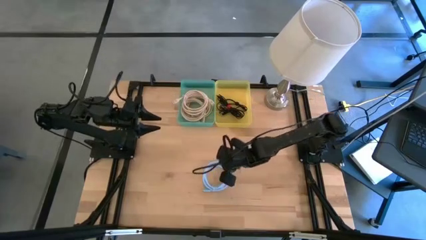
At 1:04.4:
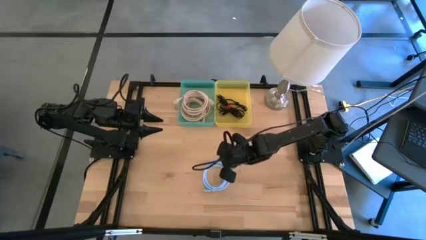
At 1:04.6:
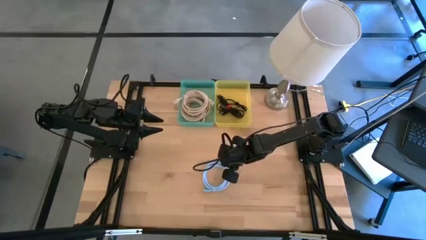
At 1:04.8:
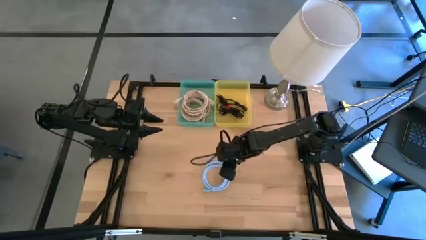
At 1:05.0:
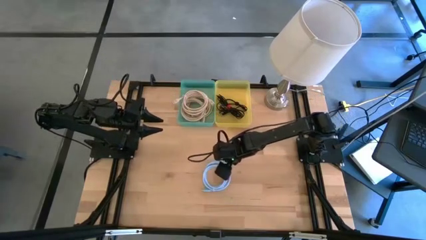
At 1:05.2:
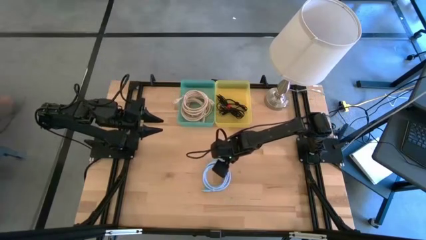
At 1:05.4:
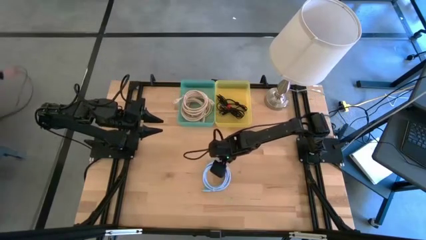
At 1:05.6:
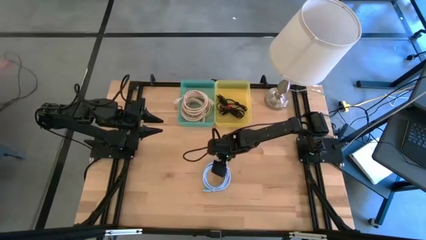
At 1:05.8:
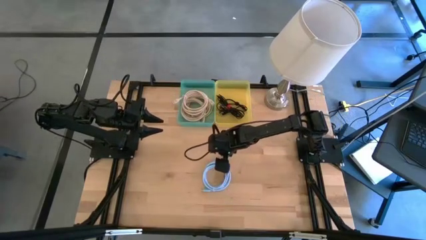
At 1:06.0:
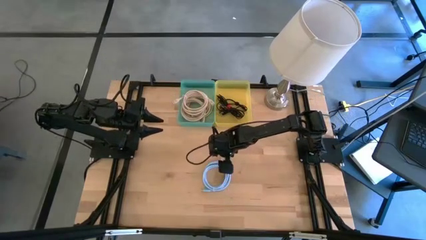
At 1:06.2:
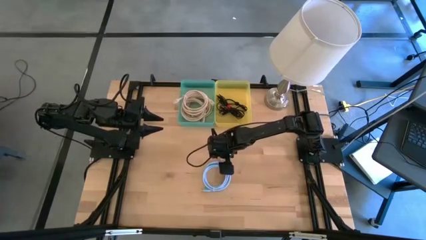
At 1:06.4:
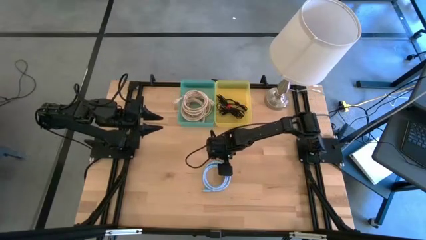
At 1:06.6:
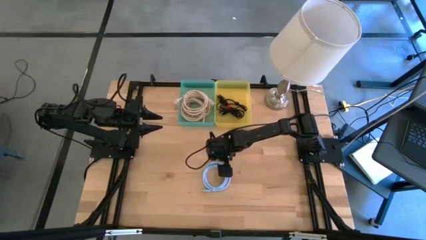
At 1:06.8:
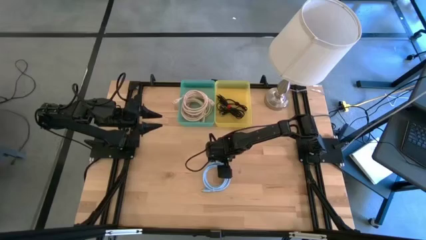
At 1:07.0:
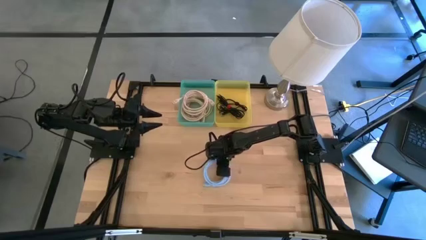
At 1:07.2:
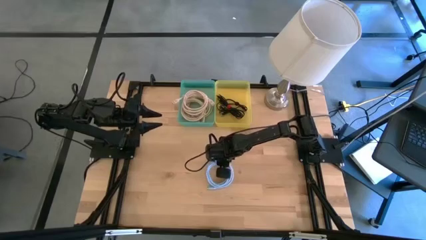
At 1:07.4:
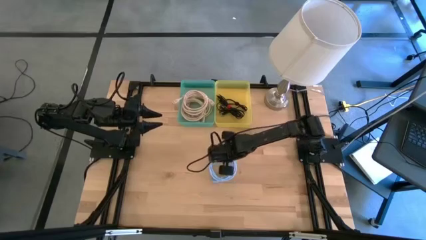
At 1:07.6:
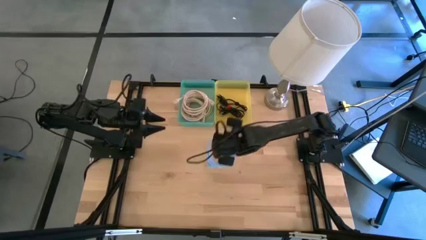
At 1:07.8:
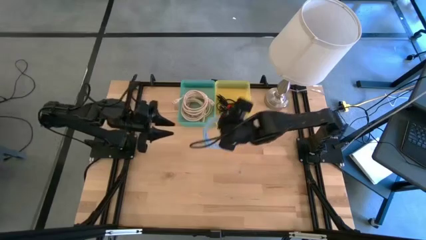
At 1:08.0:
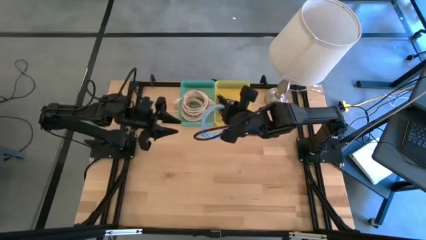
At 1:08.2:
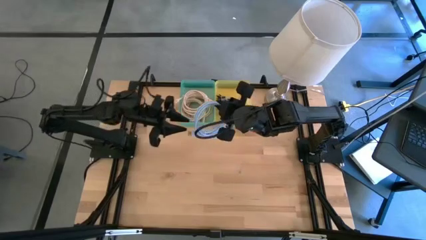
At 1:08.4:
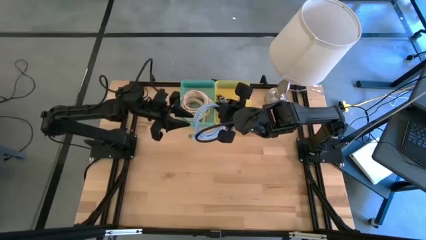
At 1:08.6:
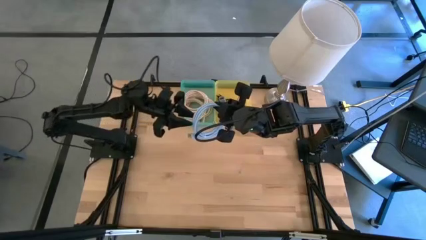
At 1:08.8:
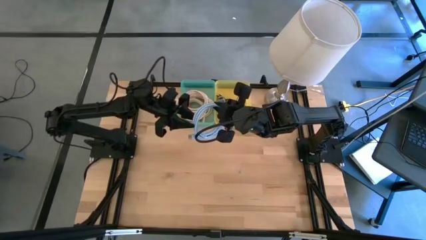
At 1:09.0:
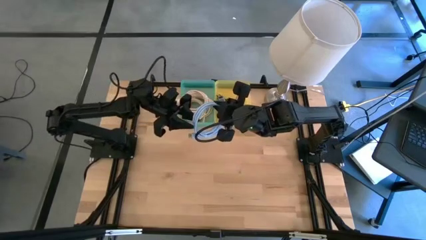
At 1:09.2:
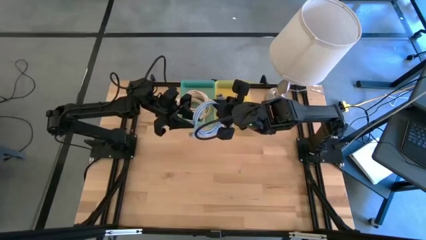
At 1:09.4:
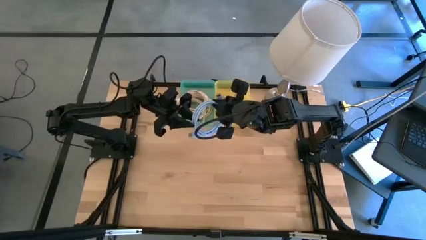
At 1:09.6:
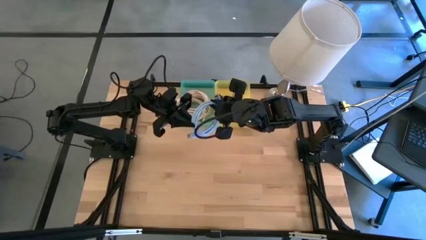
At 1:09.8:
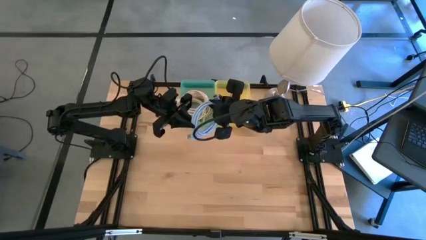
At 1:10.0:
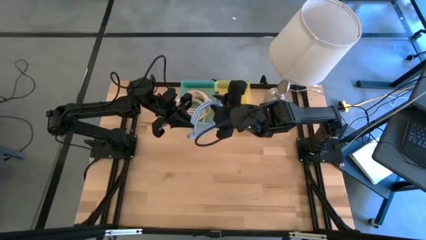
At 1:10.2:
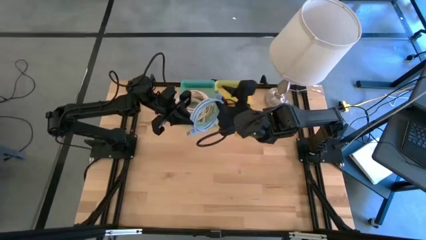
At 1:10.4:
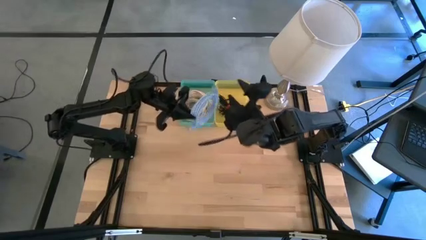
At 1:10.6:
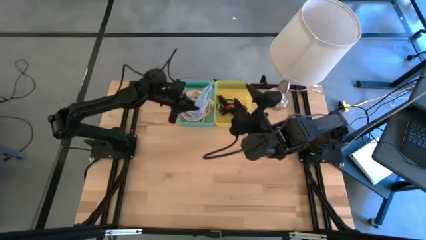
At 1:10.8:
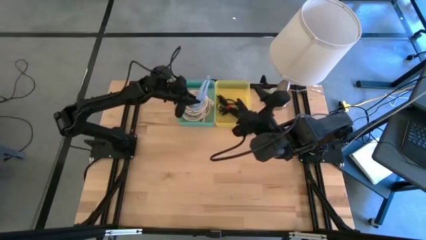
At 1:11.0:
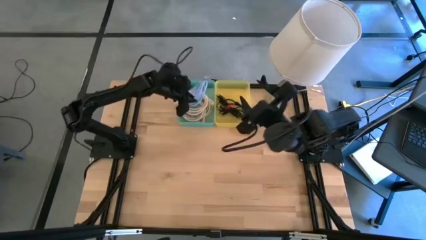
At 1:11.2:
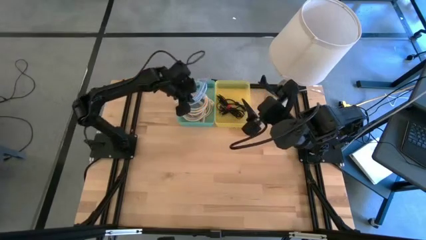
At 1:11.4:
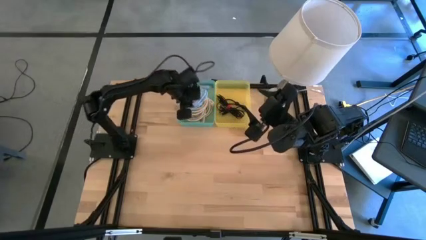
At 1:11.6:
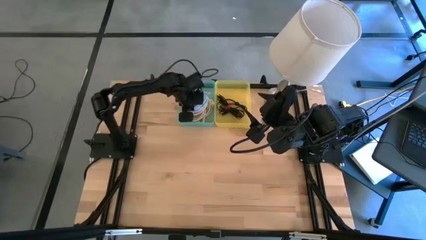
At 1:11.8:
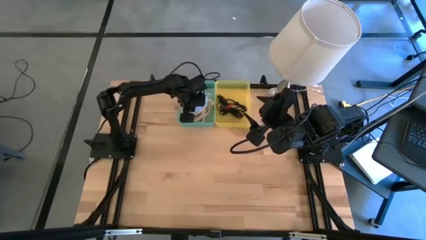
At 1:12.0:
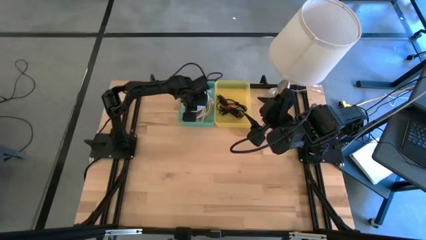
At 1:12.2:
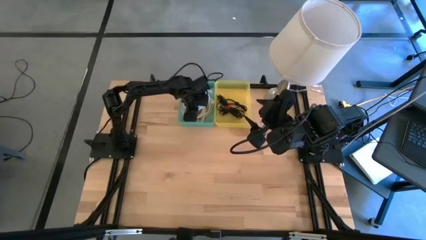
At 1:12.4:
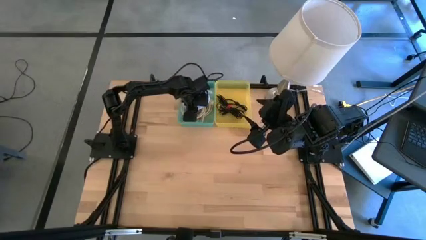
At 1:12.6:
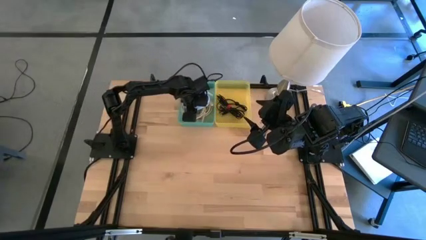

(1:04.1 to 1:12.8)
Put the blue HDMI cable into the green bin

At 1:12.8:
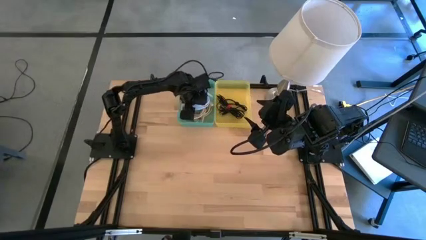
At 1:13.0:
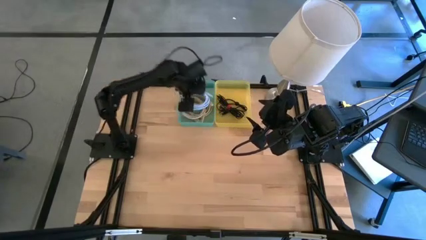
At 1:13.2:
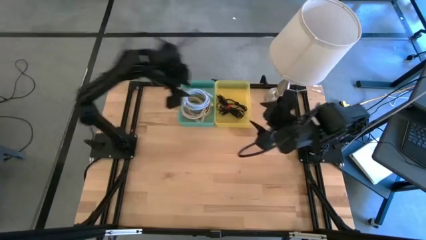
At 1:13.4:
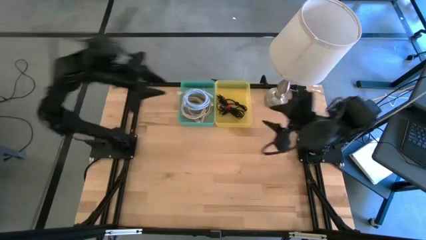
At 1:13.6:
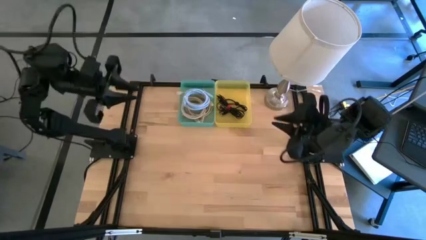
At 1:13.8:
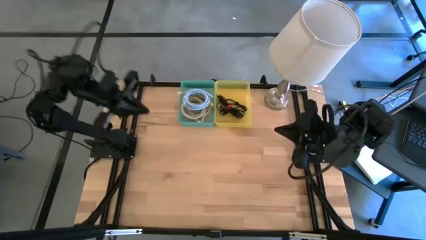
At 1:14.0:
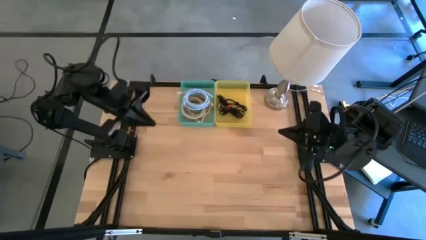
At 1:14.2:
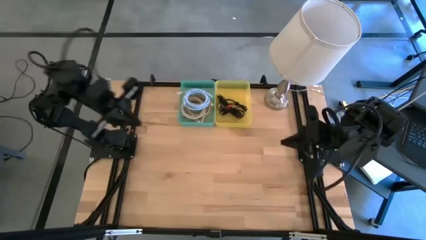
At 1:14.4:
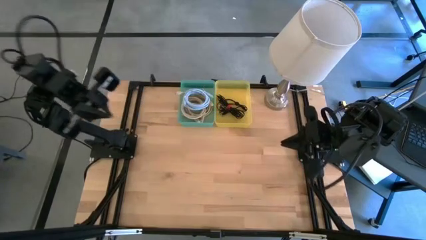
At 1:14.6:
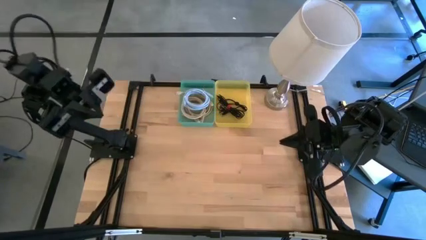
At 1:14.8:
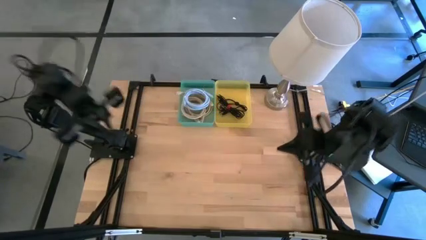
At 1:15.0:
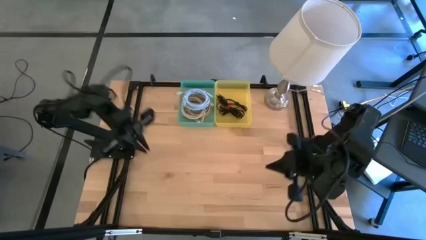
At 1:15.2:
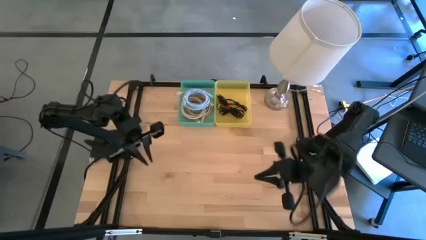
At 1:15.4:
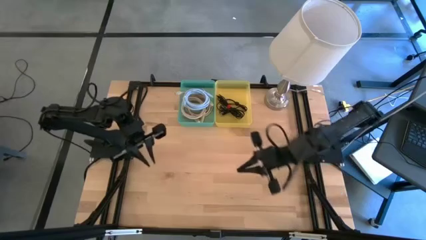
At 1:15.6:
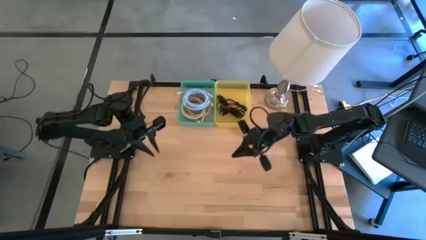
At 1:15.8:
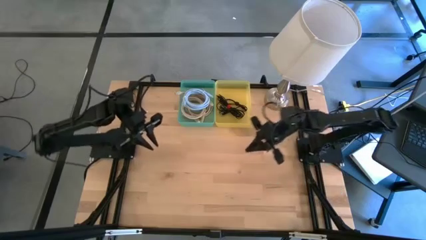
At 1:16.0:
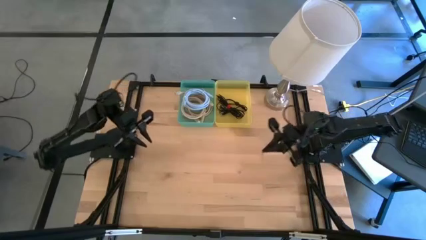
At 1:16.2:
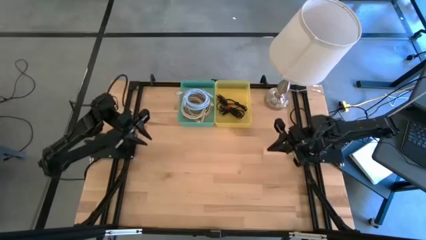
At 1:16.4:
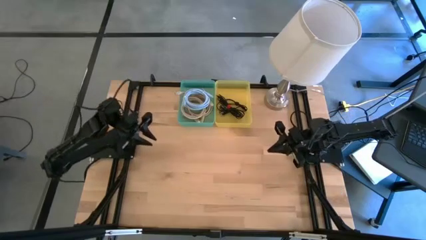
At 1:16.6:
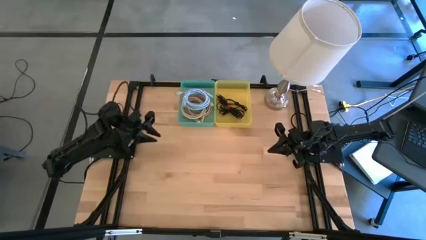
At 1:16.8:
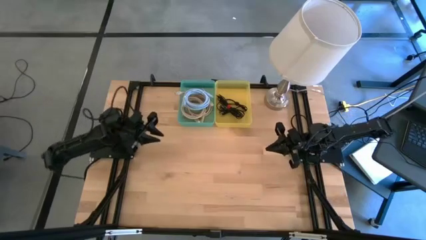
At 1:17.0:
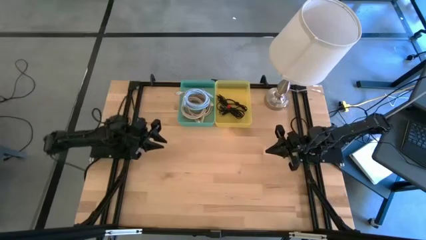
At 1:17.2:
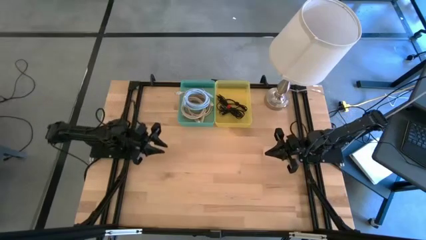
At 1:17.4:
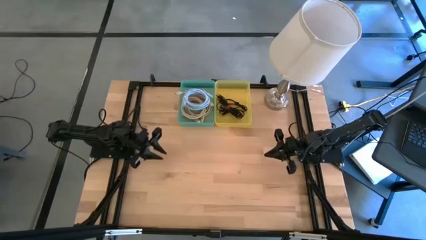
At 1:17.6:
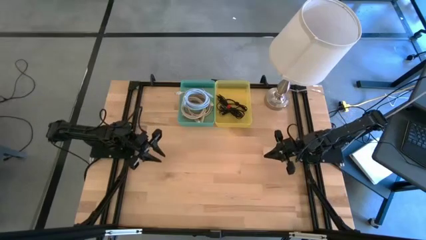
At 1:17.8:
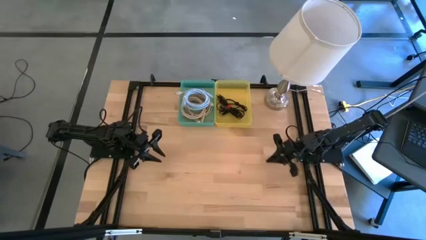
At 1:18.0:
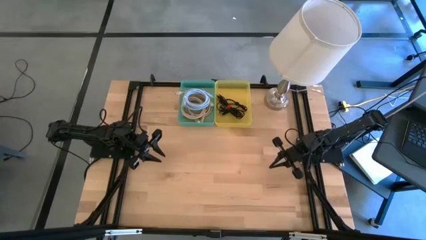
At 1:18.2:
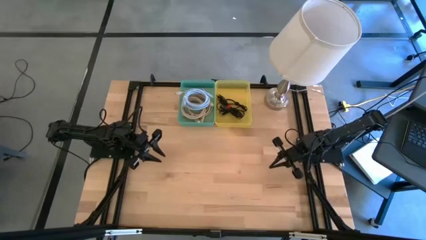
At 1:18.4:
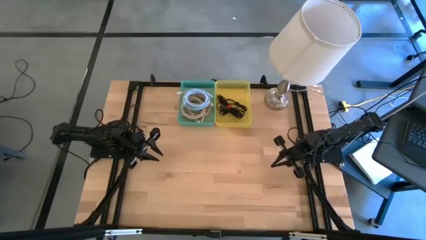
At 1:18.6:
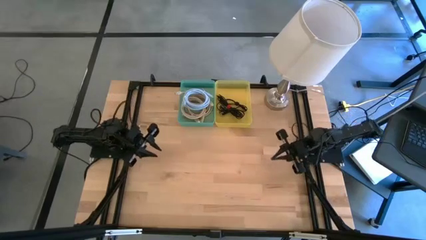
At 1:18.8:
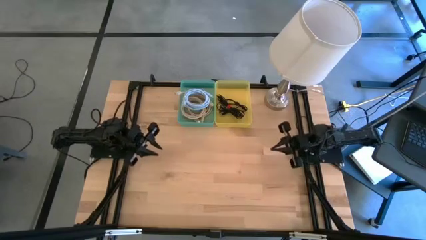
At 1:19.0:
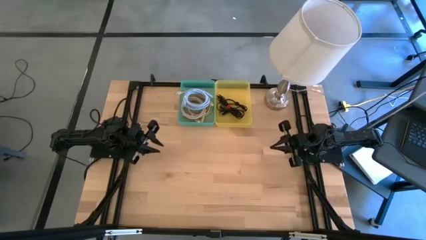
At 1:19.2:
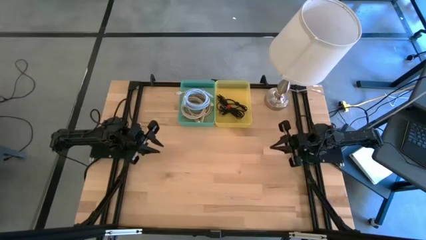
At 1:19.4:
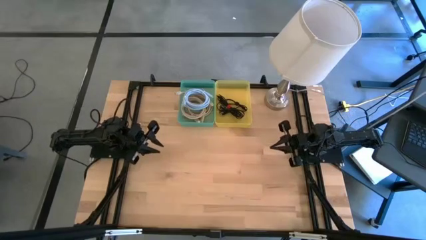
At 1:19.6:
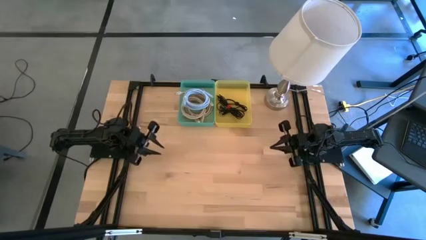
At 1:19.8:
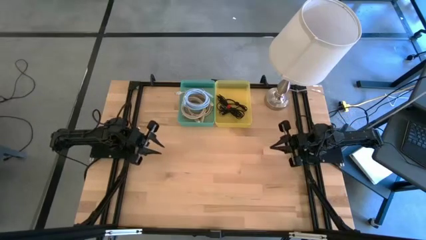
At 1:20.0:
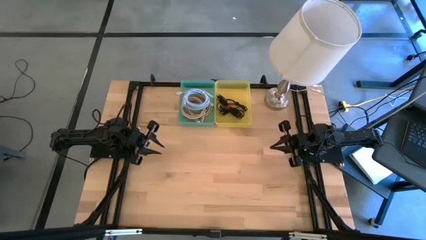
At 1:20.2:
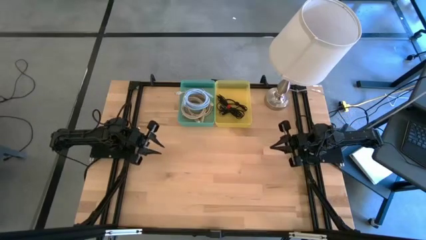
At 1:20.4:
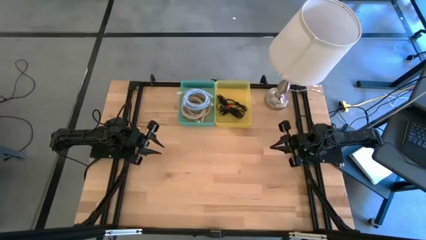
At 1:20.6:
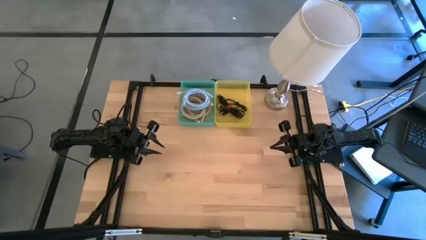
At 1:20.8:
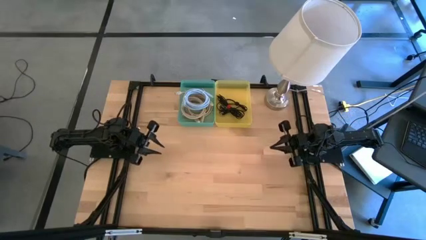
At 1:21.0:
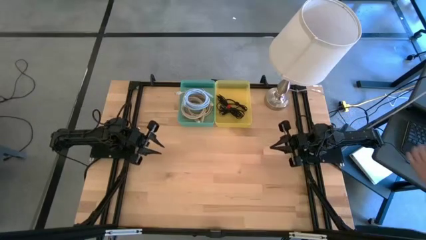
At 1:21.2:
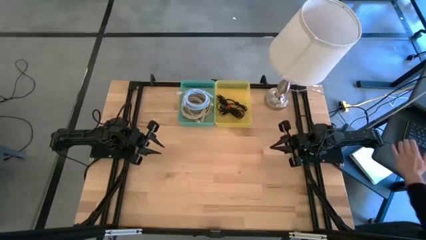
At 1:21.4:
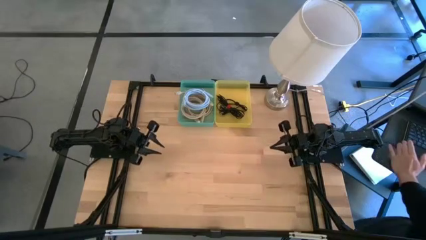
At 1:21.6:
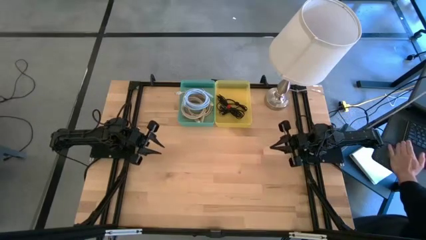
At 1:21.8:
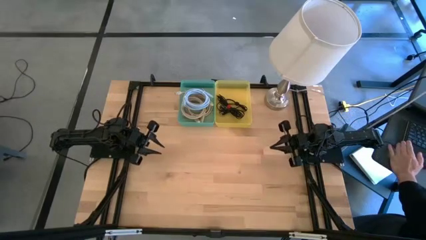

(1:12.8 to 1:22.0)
Return to Home Position
